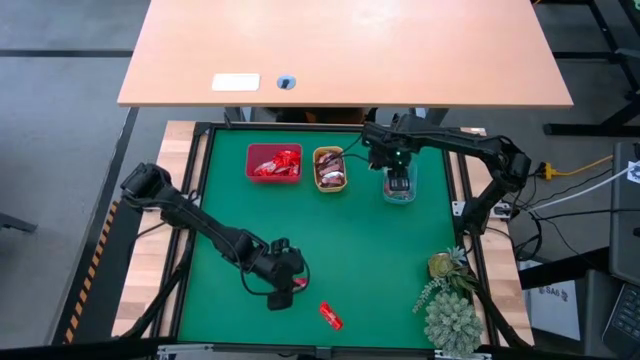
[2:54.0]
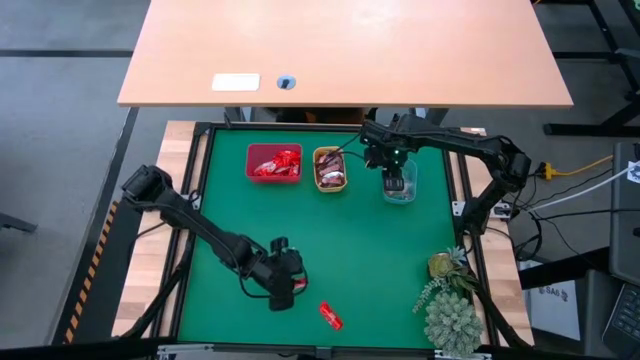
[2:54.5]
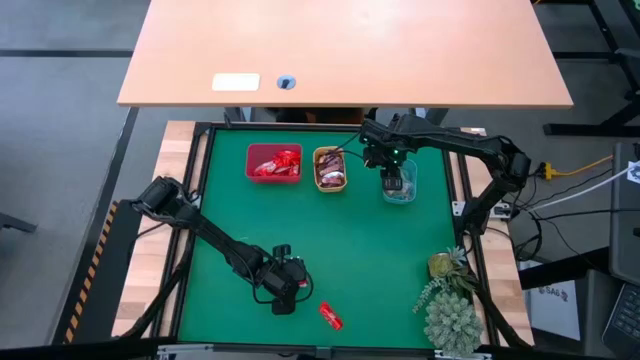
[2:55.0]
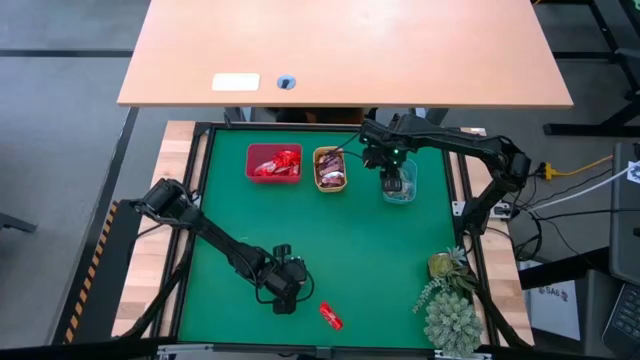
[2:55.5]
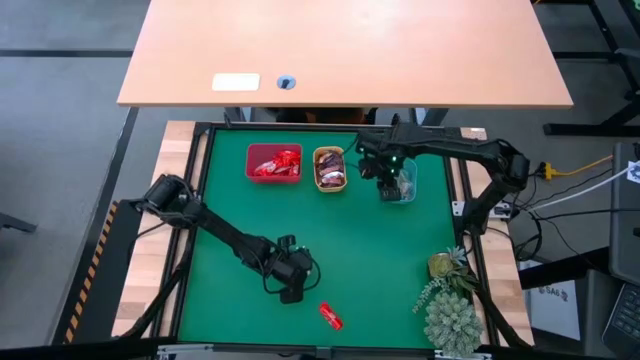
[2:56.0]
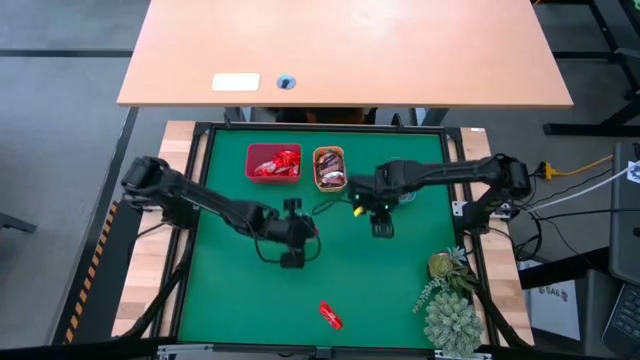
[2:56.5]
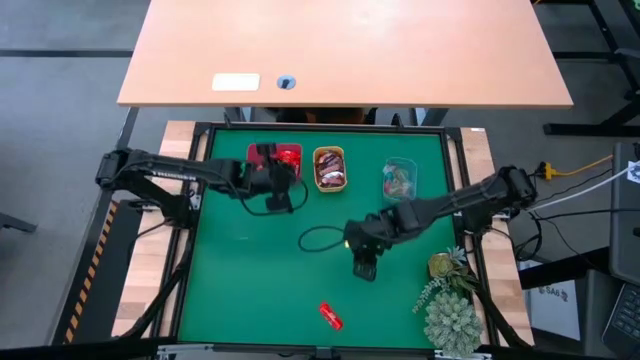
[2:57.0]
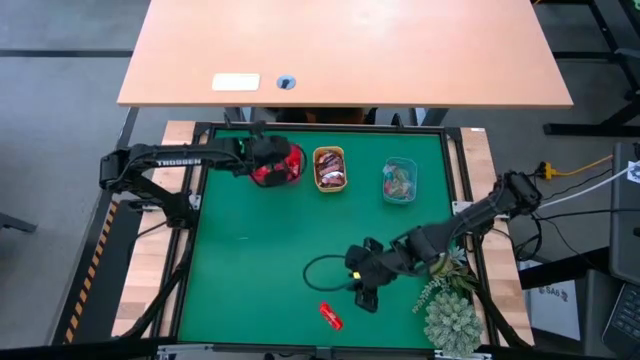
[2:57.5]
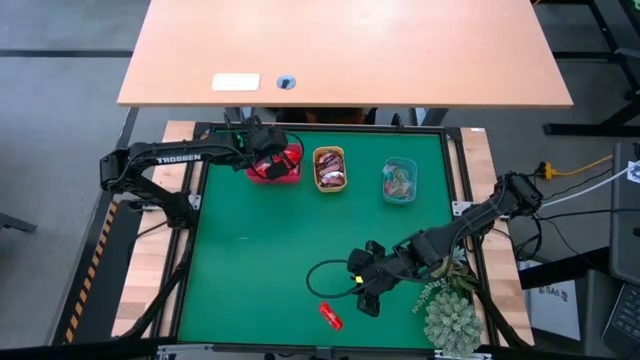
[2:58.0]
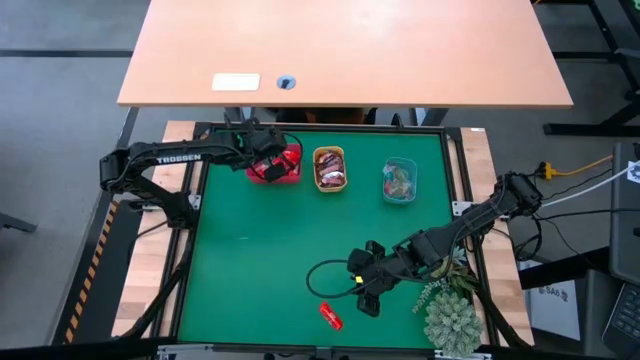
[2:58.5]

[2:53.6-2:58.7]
Task: Sort candy
Put the red chocolate bar into the red bin

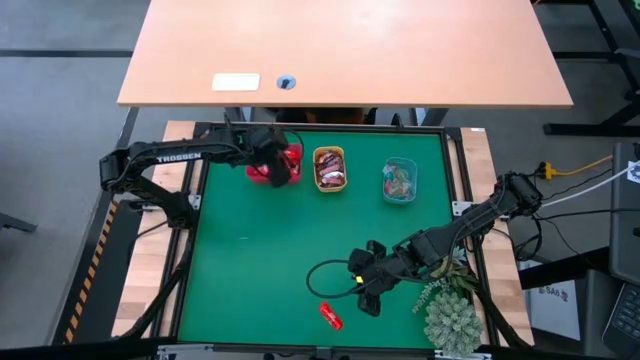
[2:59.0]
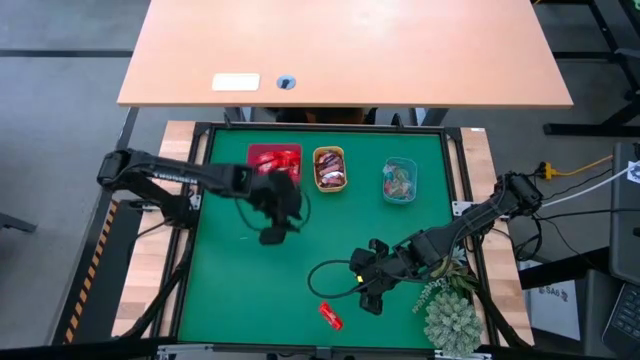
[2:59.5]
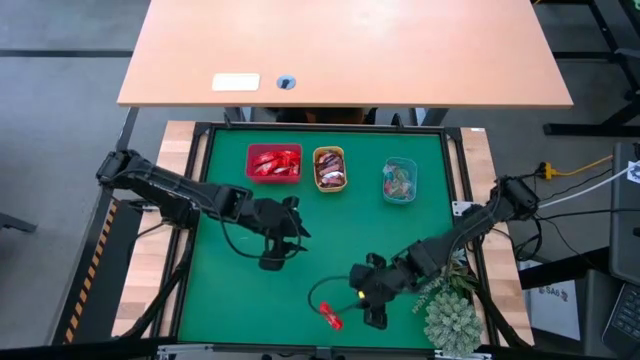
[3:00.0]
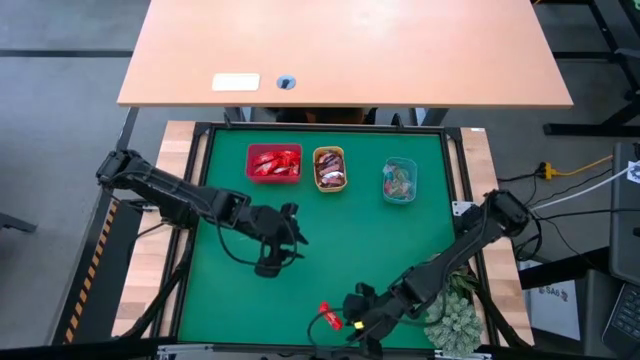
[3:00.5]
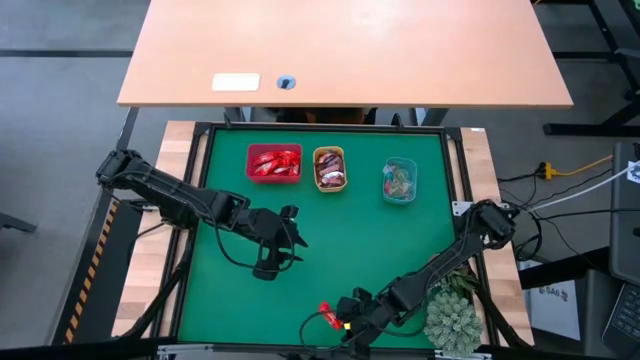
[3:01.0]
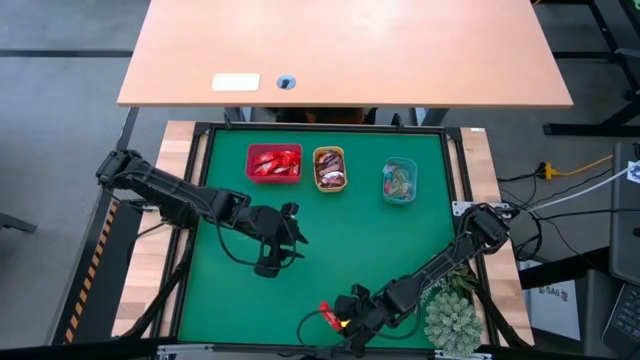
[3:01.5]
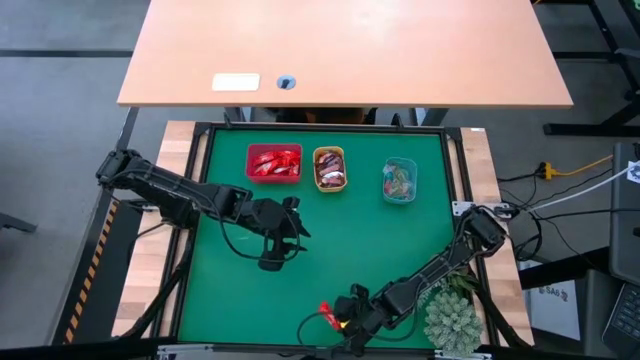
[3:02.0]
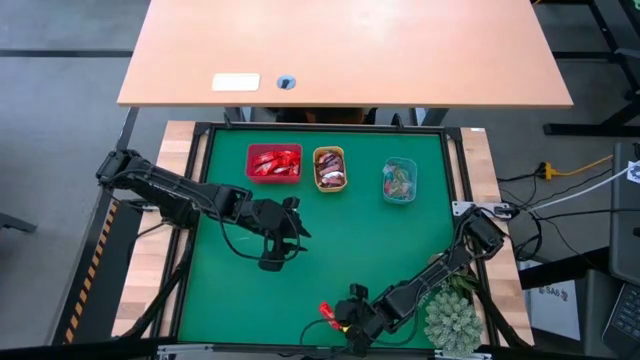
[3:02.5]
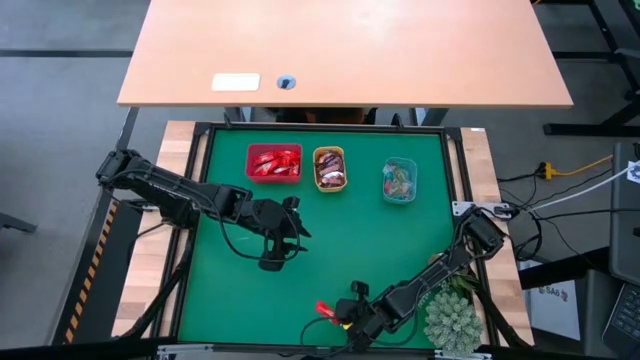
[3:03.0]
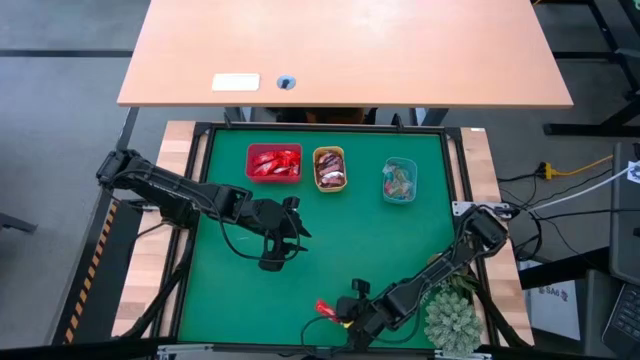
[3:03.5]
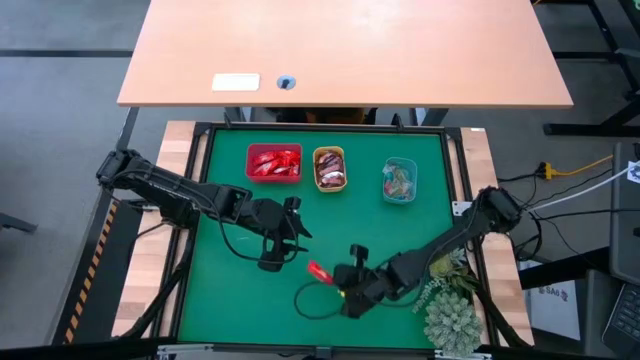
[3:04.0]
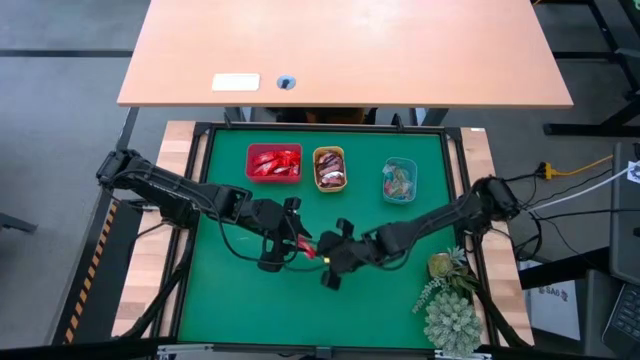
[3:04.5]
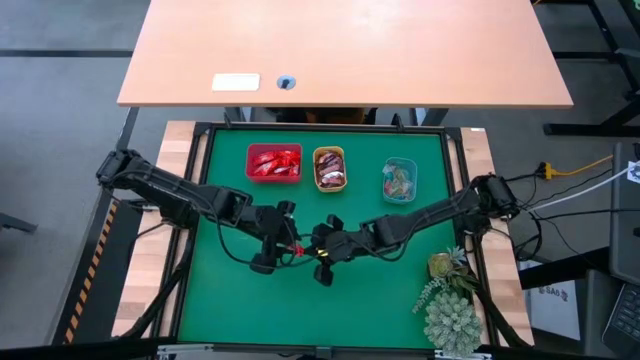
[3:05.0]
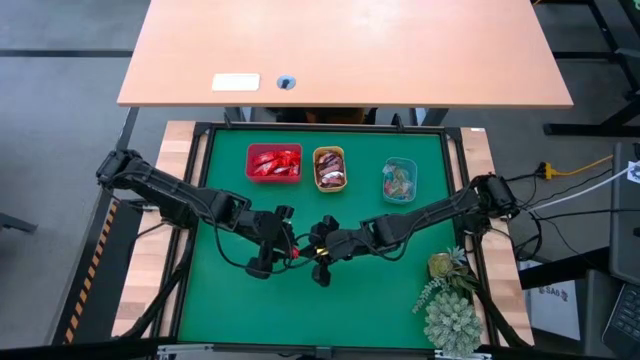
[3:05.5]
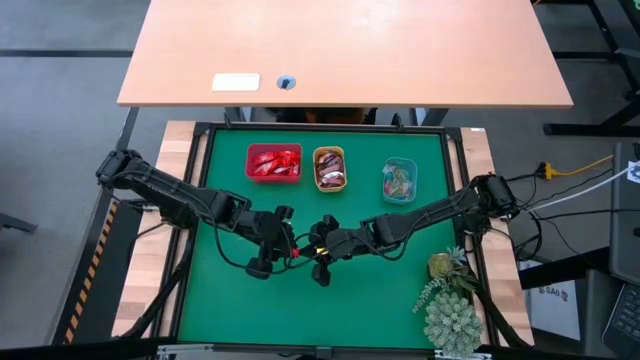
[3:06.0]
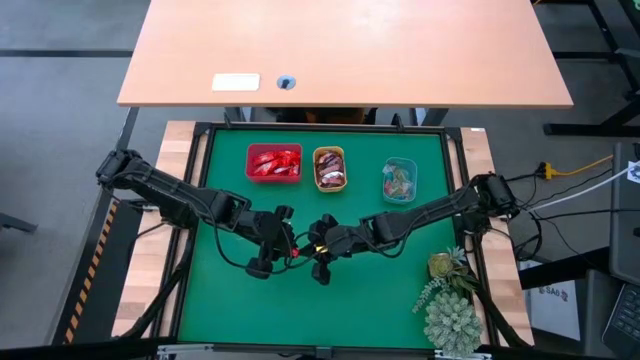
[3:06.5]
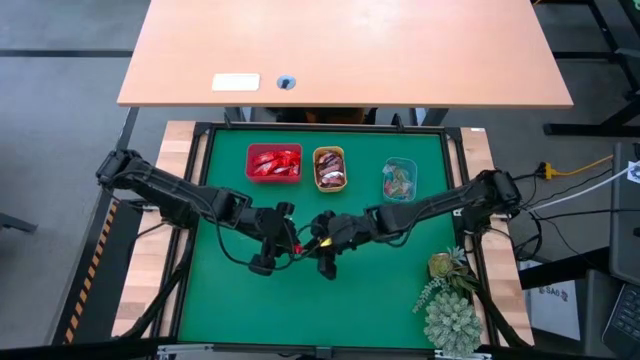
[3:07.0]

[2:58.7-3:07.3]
Put the red chocolate bar into the red bin

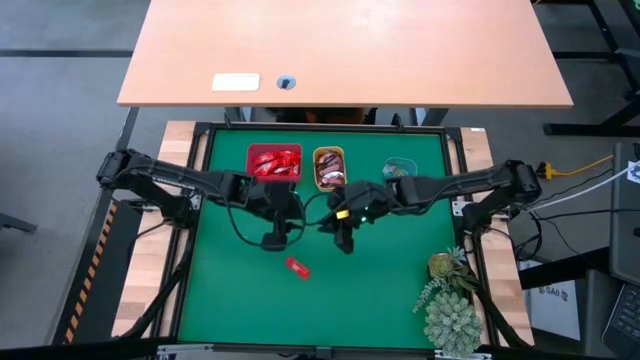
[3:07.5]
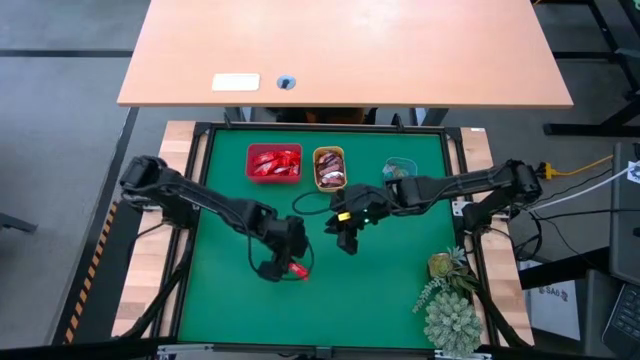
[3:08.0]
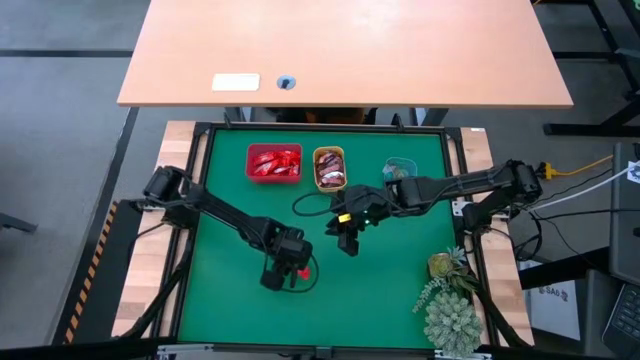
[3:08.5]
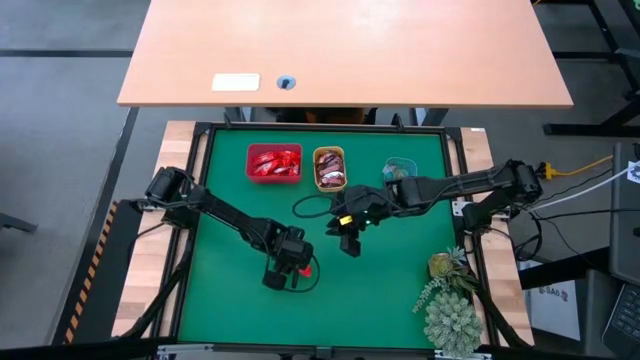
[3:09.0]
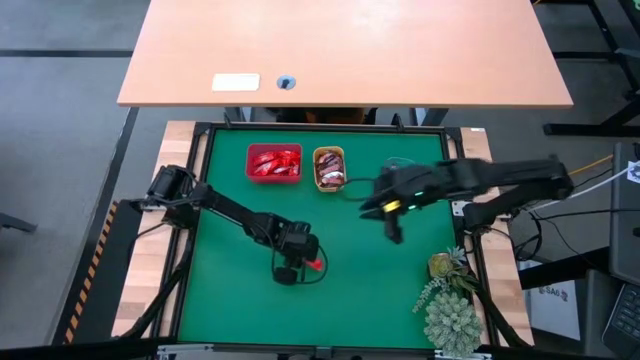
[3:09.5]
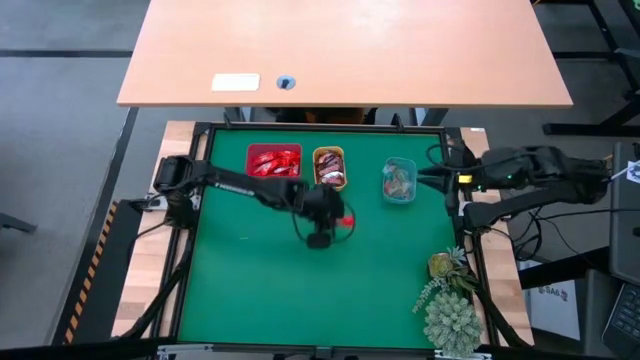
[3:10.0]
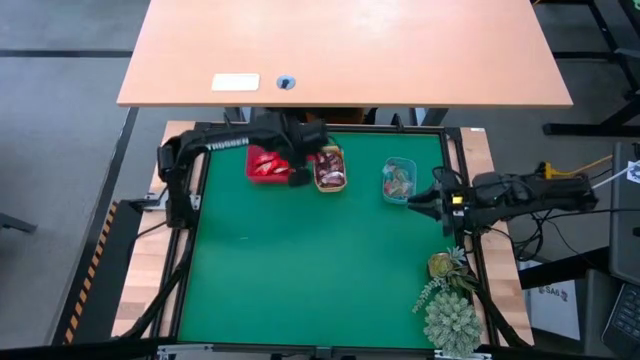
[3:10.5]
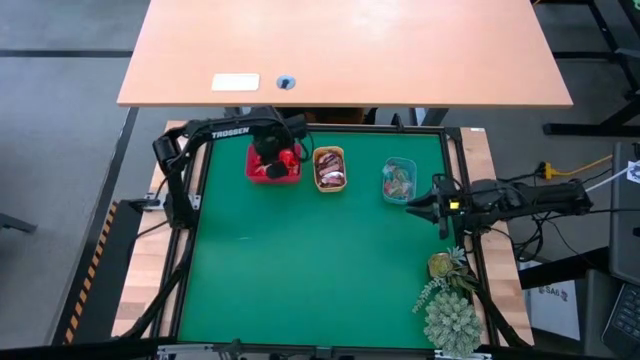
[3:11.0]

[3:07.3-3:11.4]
Put the red chocolate bar into the red bin
